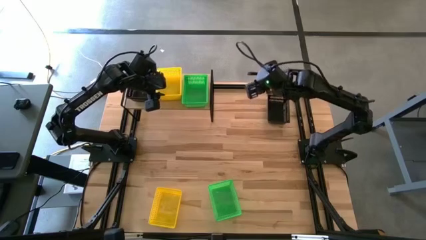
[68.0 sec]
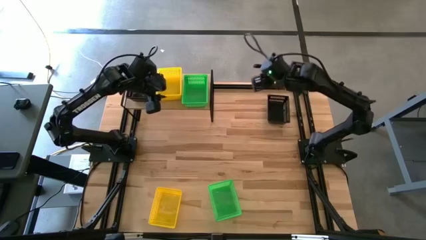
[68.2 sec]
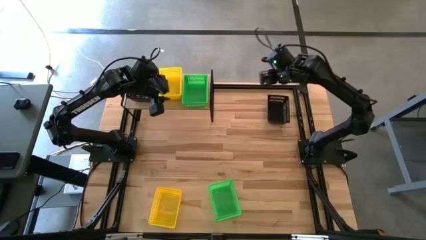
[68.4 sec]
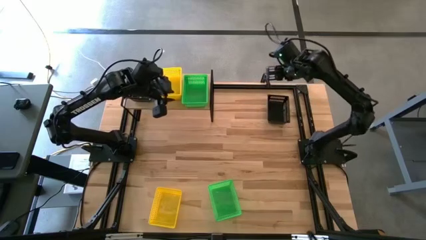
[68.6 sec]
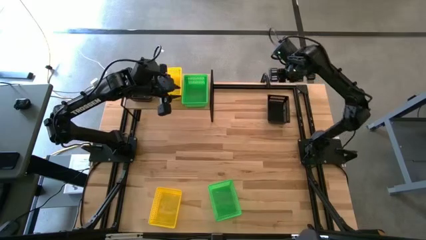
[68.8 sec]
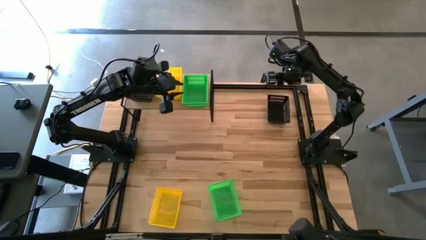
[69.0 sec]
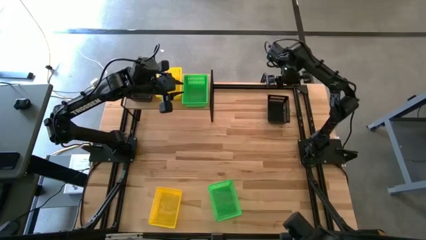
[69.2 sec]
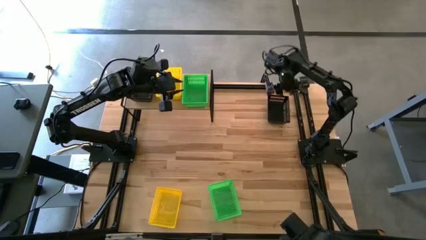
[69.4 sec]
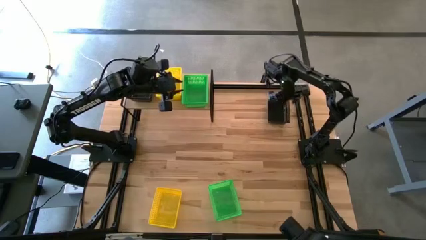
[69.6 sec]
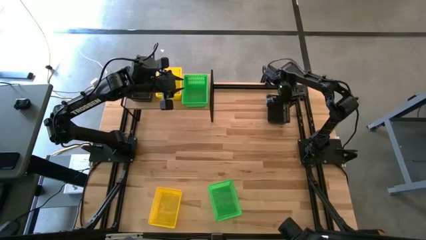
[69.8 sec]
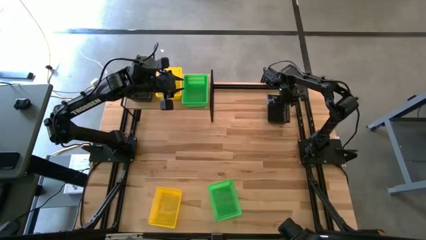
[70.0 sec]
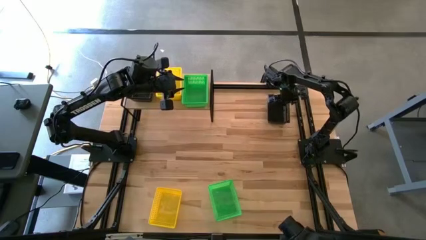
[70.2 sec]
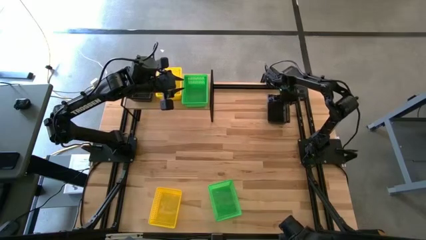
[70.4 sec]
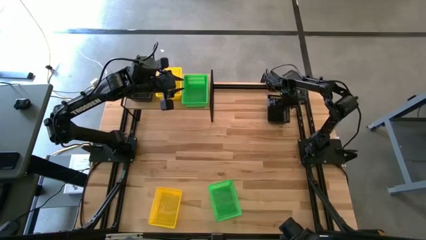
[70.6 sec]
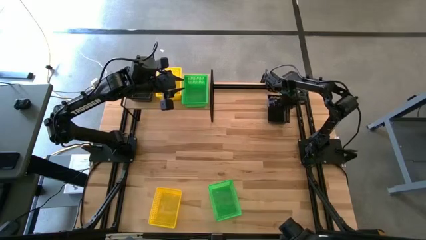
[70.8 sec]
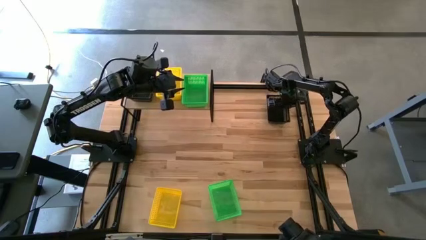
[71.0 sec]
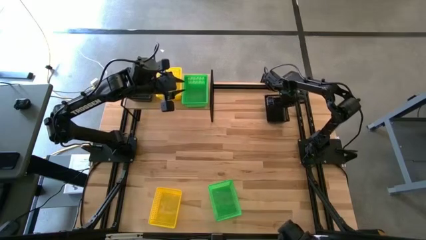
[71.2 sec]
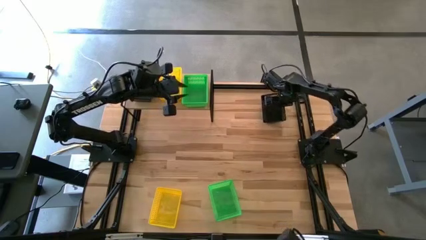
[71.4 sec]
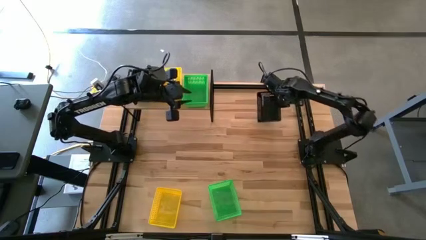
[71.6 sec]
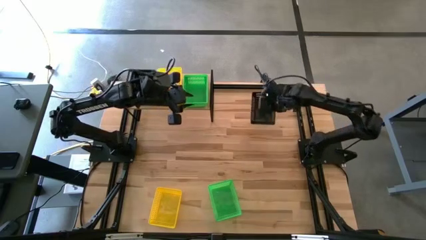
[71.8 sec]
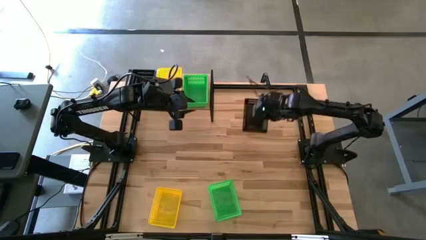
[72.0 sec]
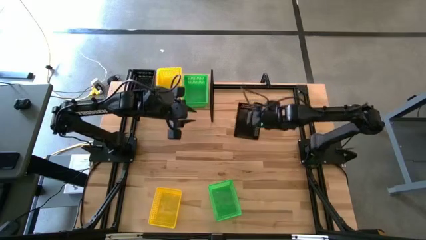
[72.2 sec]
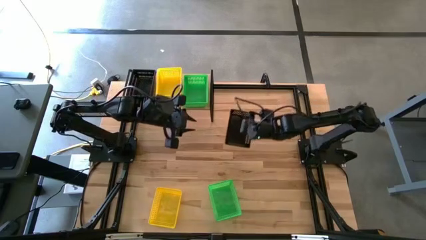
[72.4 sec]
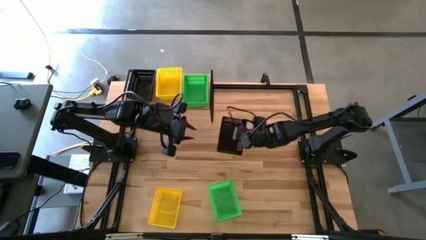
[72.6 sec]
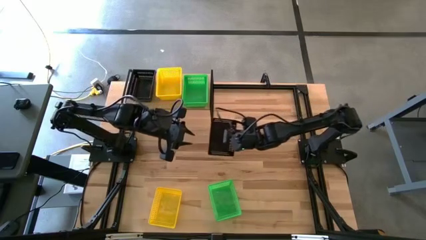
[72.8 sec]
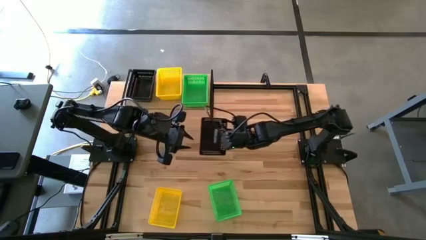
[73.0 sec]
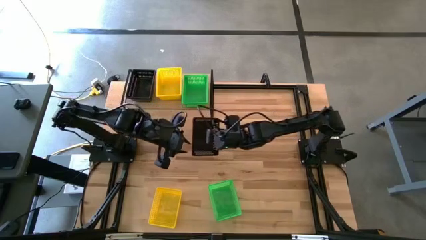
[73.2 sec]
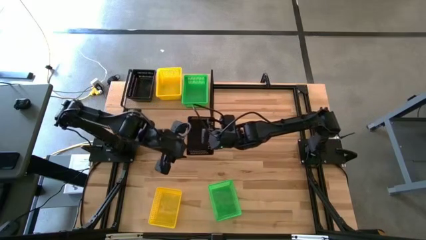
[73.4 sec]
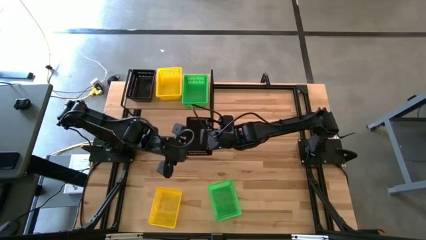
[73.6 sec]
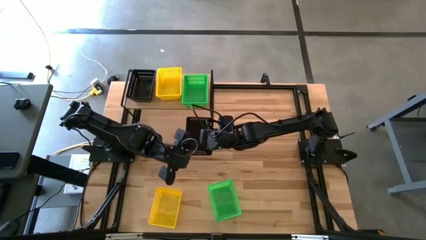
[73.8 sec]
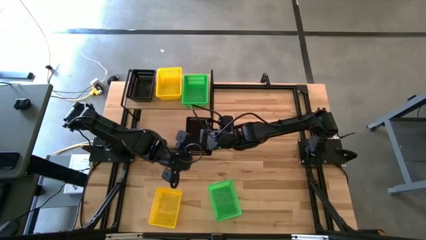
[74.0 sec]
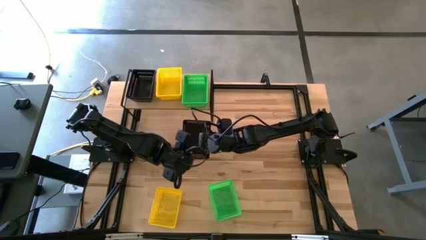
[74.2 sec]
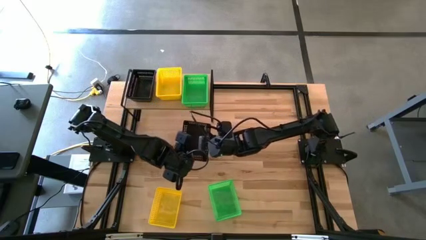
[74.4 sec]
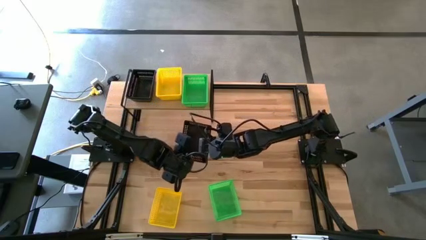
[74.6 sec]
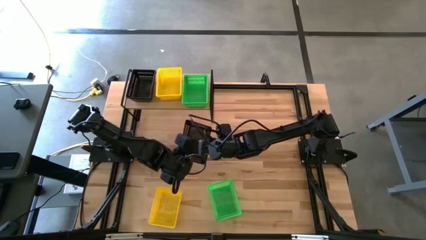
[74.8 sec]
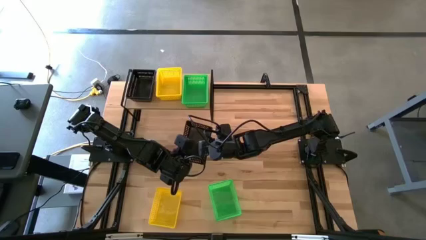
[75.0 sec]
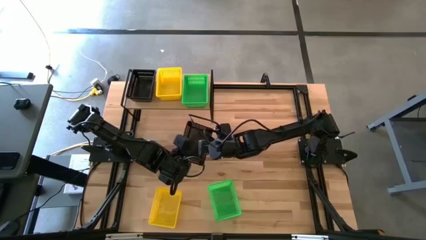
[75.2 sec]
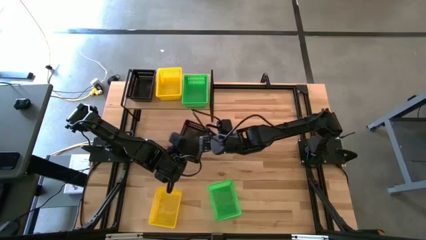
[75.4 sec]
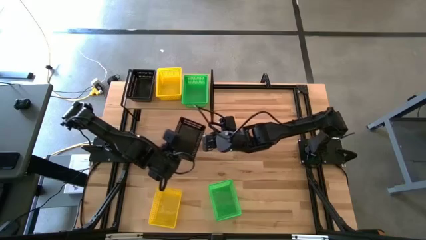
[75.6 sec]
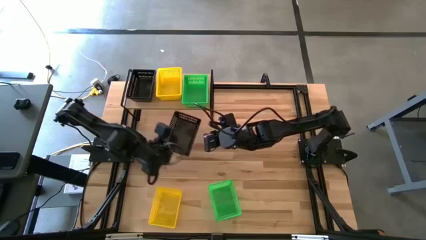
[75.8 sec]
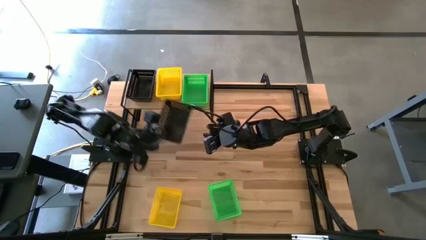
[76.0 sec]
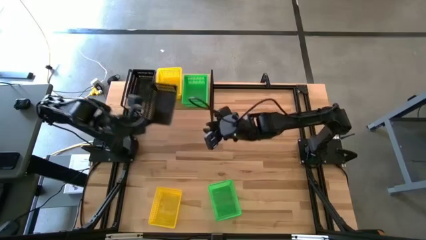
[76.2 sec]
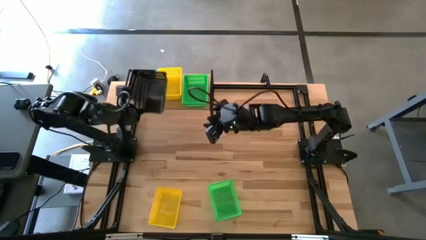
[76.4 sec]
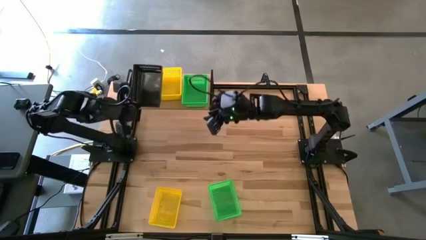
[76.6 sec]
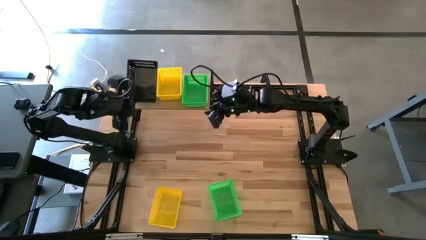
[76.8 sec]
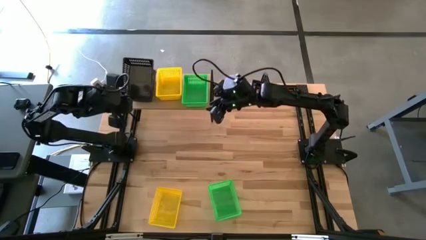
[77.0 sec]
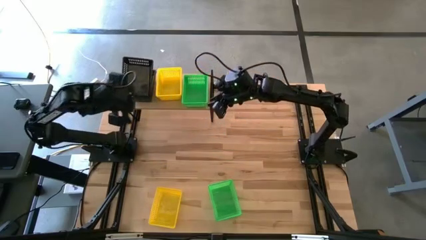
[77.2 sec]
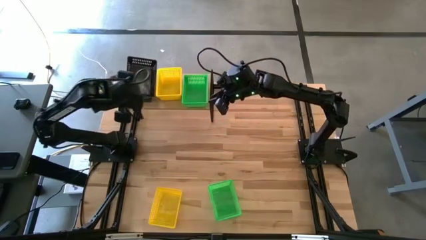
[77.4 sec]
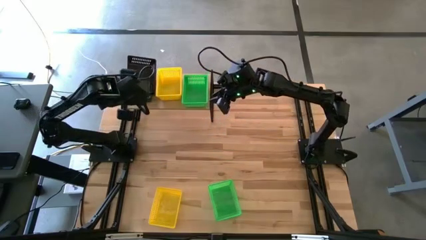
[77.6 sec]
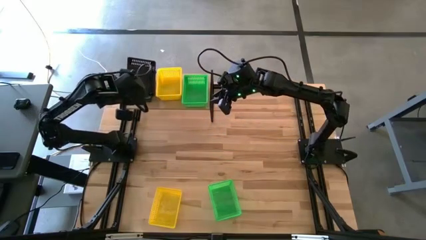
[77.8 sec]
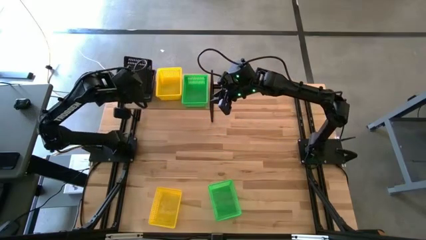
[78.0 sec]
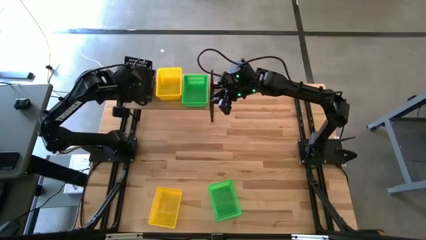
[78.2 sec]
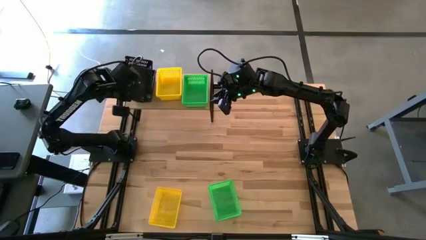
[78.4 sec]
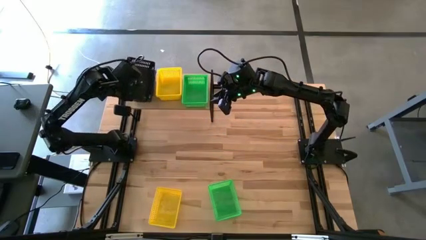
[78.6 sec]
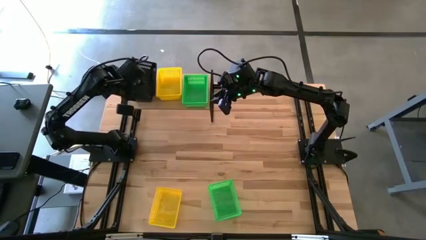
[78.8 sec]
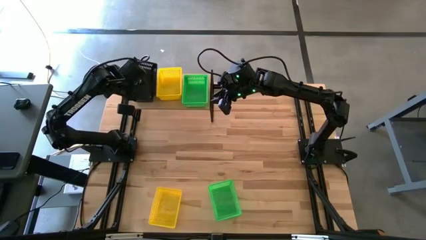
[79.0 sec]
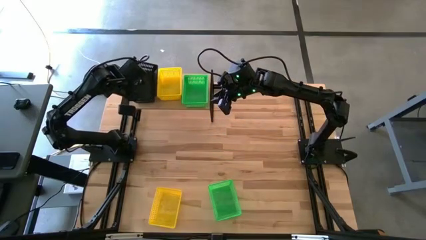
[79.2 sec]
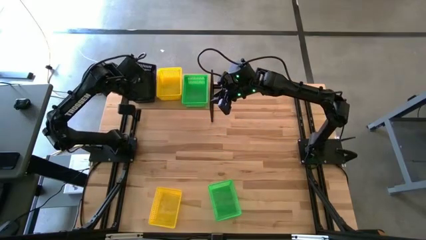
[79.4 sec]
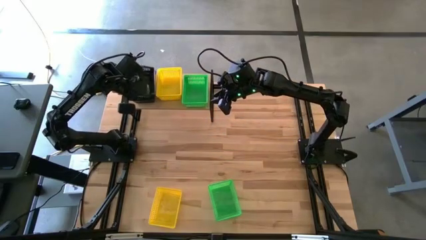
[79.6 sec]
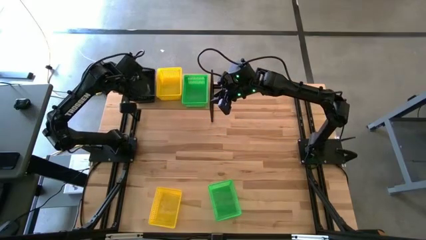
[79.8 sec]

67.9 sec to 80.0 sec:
Task: Stack baskets on shelf by color
Stack the black basket on top of the black baskets on the shelf

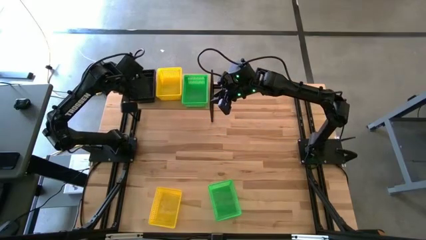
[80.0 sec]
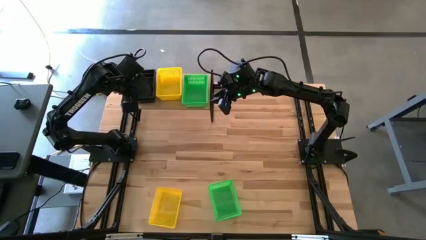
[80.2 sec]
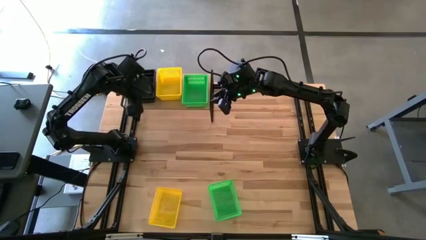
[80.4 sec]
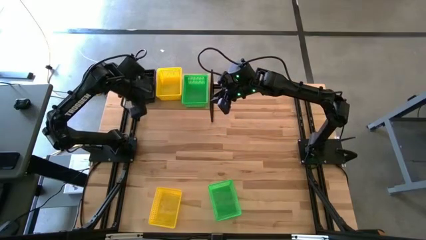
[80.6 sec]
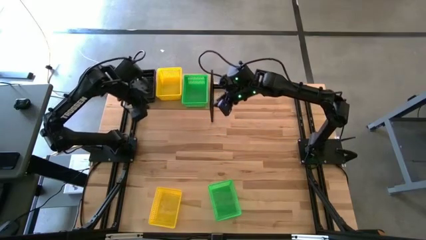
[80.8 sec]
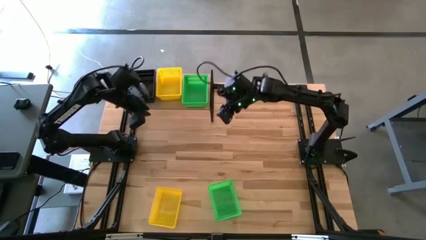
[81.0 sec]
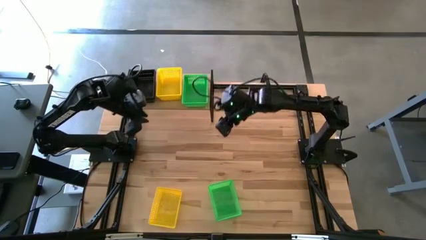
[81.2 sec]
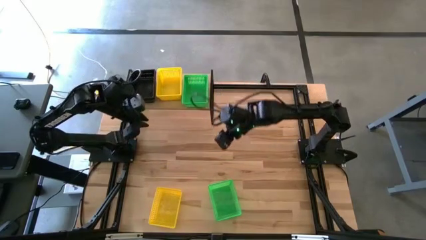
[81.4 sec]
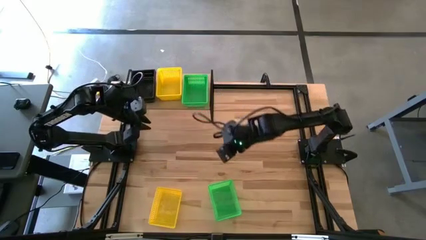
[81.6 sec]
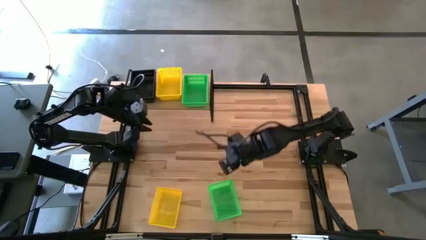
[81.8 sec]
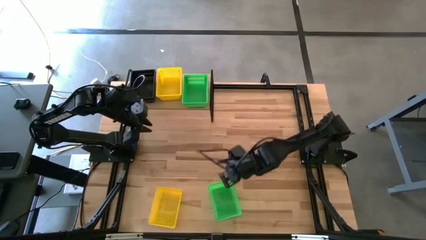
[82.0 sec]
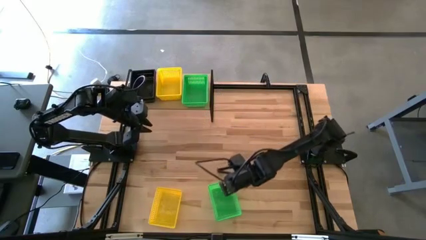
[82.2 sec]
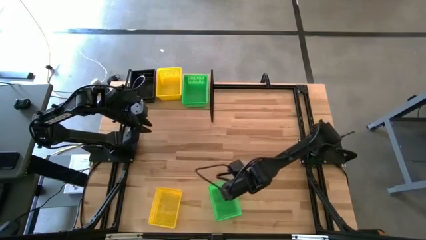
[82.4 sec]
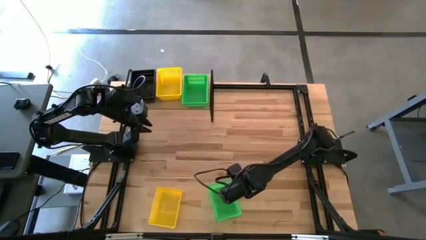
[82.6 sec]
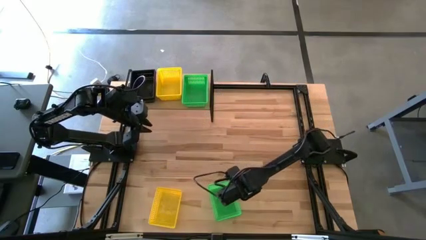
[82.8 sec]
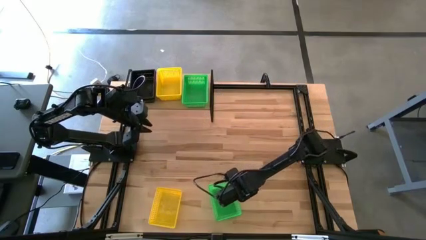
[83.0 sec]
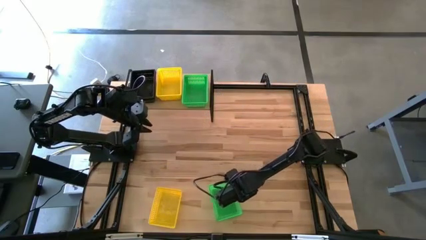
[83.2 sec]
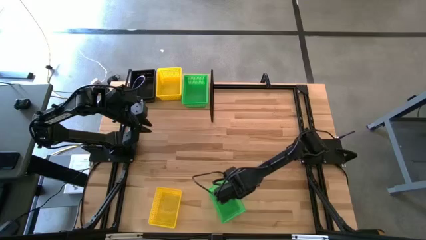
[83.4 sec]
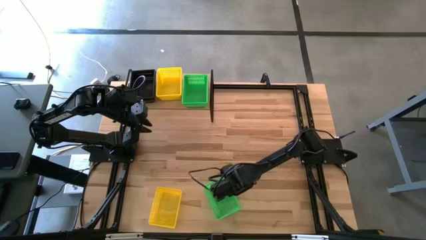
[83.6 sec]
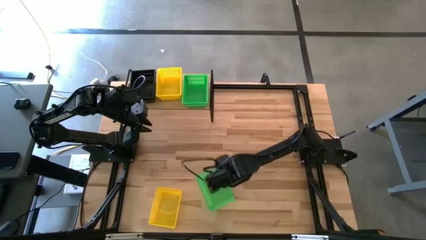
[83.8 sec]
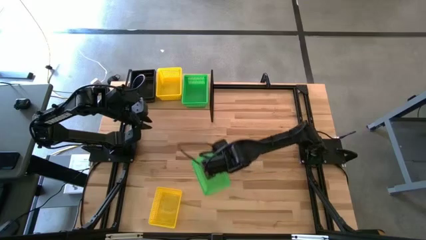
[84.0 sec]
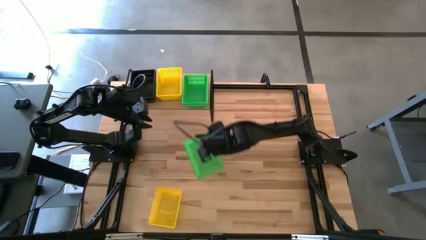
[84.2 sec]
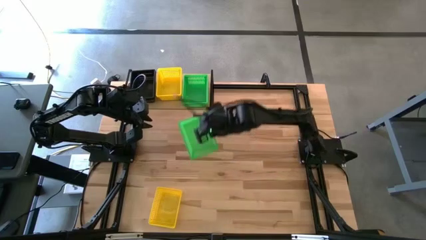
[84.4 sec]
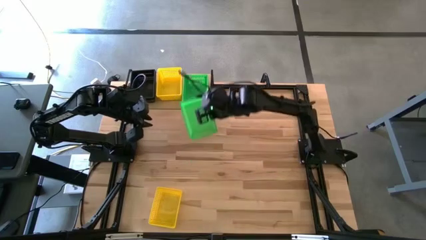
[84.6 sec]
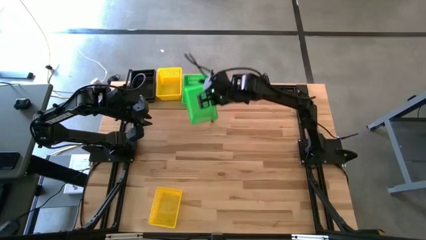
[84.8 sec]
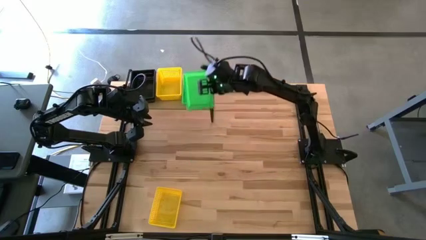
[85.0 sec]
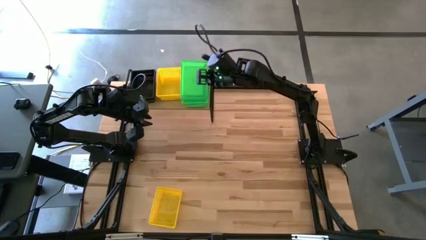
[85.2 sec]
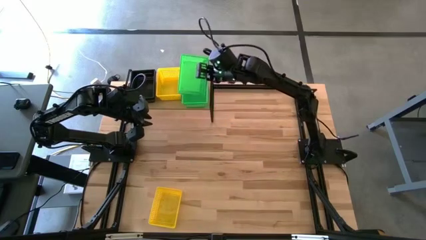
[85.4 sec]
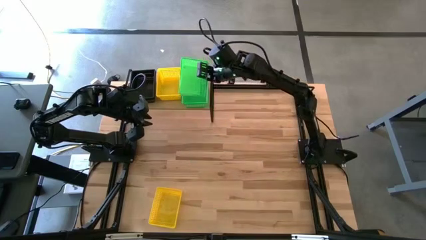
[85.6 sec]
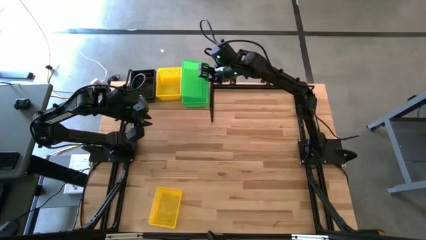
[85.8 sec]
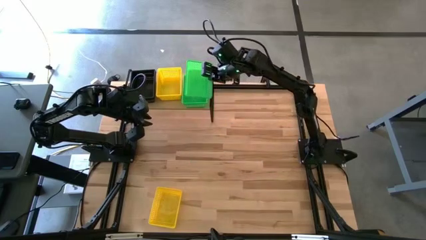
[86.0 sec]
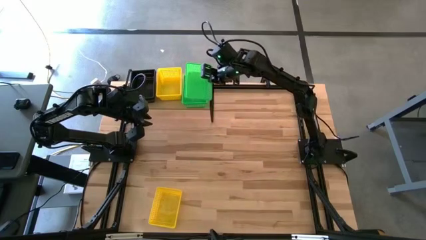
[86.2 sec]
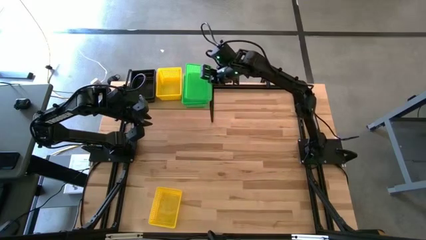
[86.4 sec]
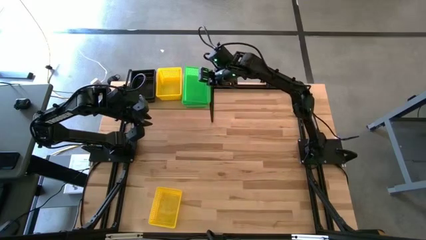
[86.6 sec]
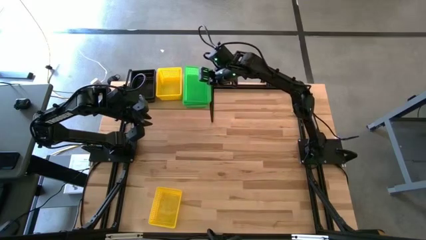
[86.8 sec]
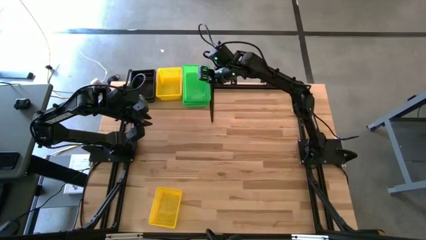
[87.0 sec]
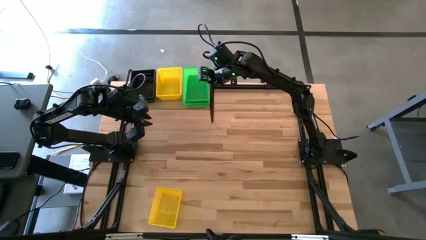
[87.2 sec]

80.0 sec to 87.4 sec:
Stack the green basket on top of the green baskets on the shelf
